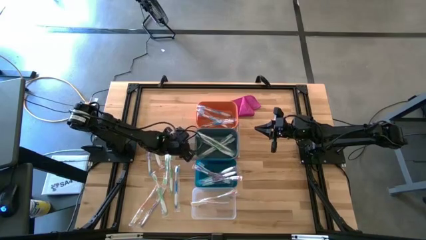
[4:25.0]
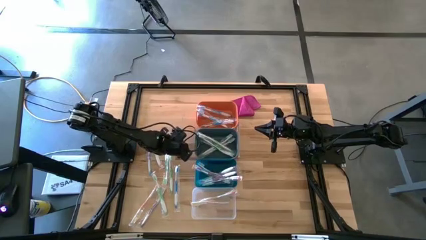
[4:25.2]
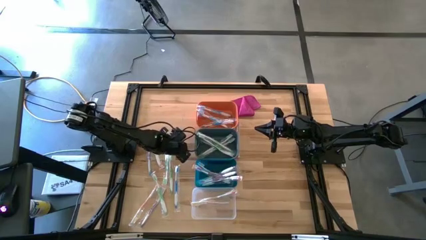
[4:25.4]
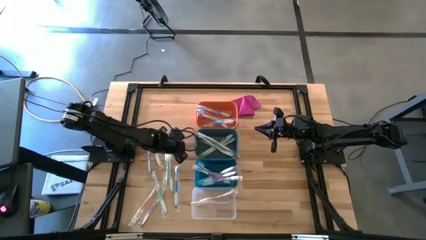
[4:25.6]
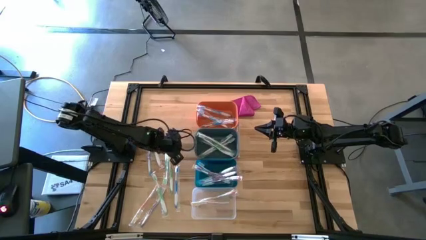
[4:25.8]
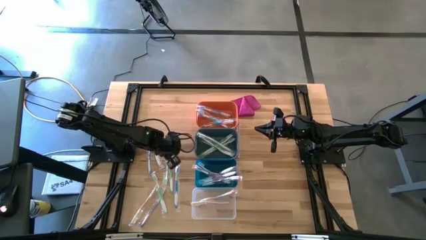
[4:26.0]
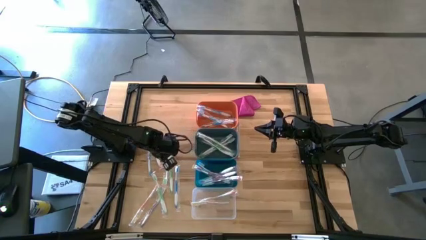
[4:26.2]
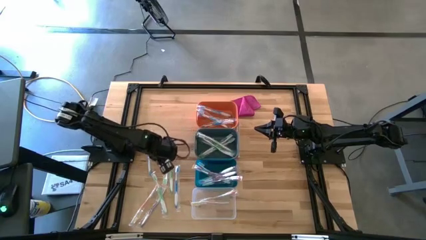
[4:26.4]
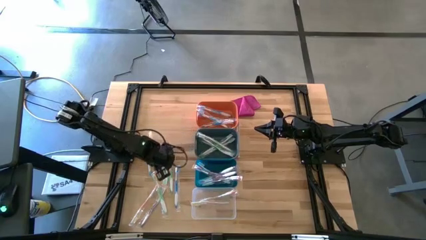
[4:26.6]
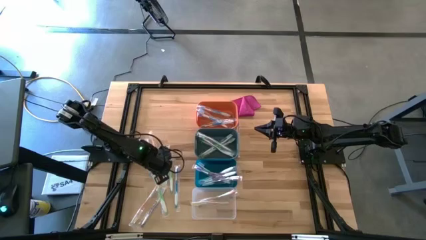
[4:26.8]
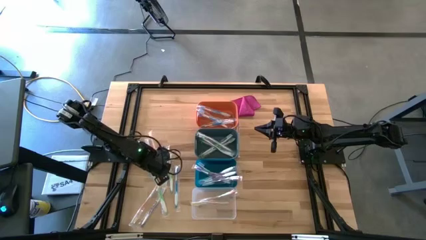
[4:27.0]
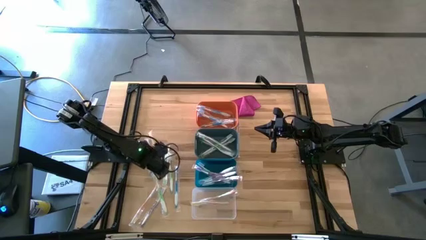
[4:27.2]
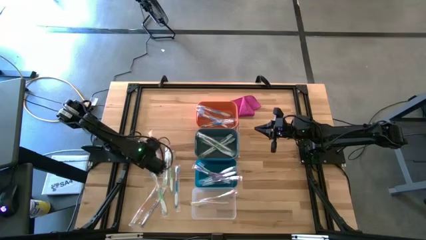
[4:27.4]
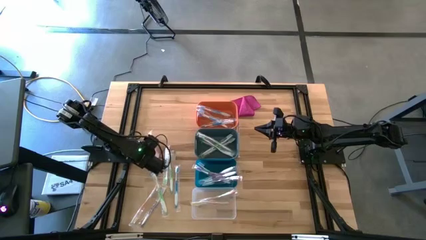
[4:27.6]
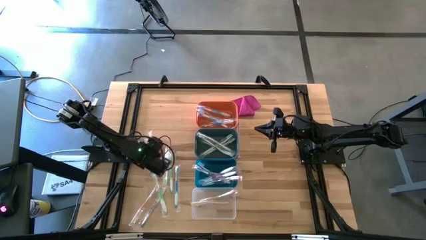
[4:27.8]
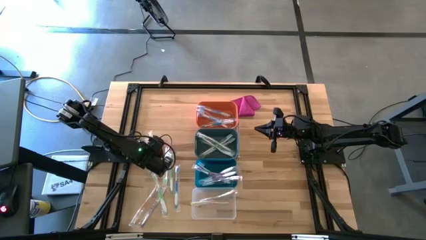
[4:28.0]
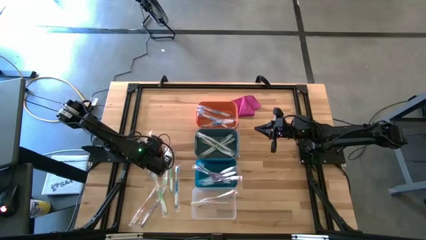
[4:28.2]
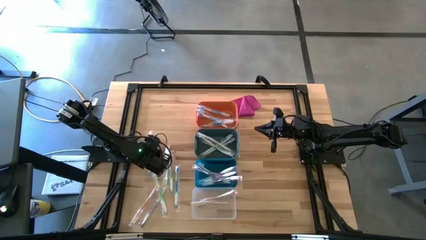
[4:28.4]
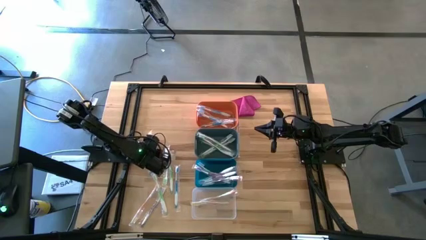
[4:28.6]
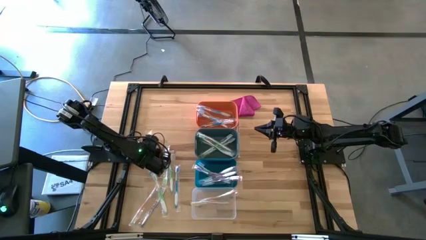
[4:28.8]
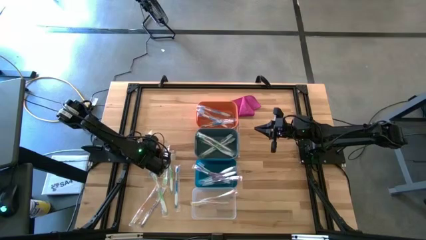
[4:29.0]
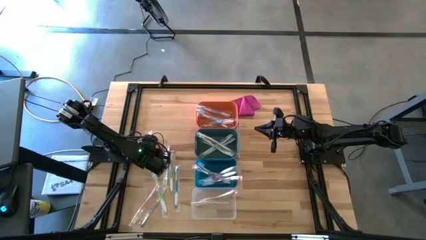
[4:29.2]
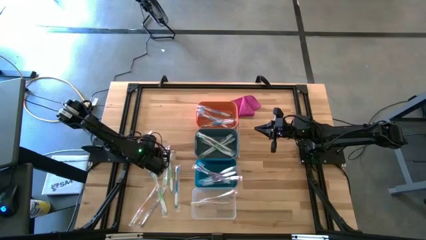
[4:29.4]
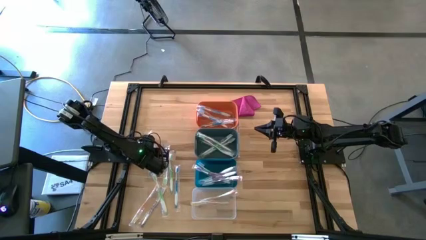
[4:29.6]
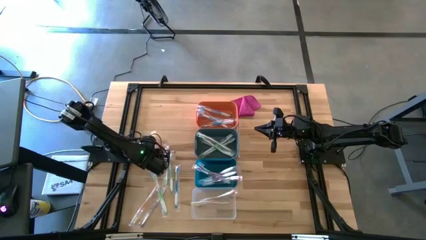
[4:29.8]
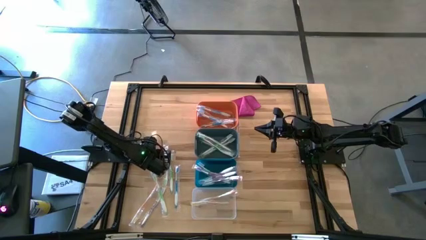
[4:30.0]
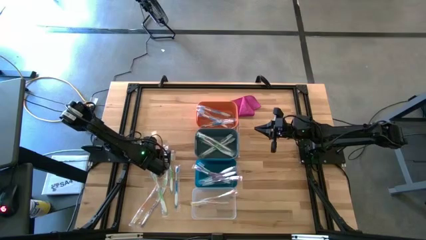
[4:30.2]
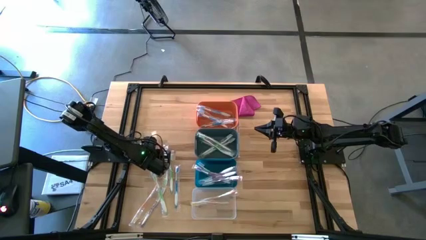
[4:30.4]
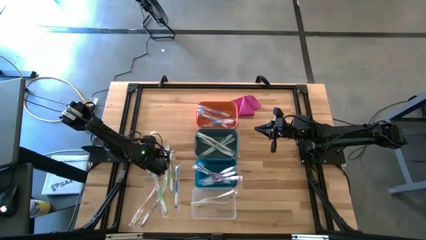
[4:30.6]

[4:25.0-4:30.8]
Task: Pick & Place Toothbrushes
Put the orange toothbrush into the transparent bin

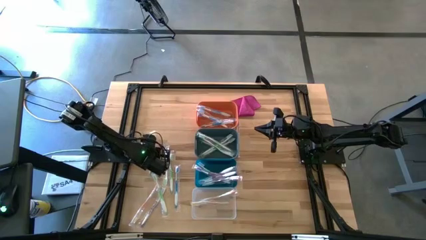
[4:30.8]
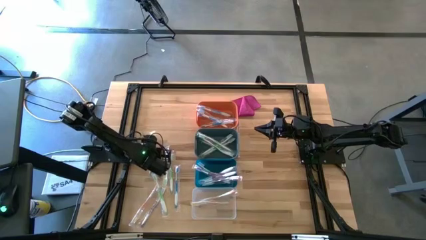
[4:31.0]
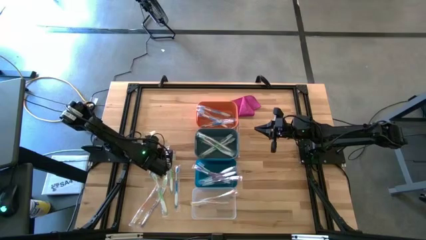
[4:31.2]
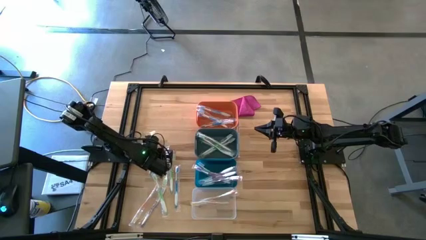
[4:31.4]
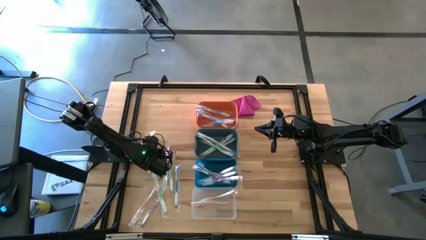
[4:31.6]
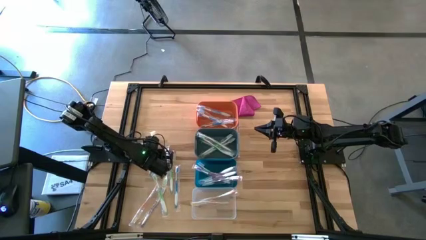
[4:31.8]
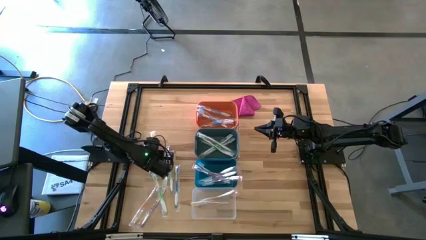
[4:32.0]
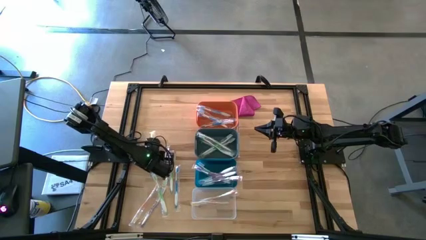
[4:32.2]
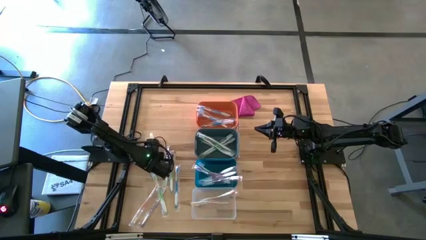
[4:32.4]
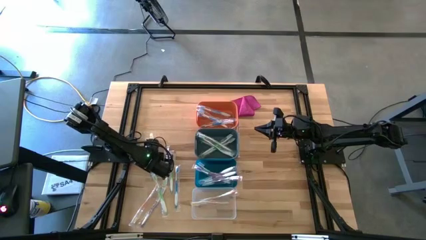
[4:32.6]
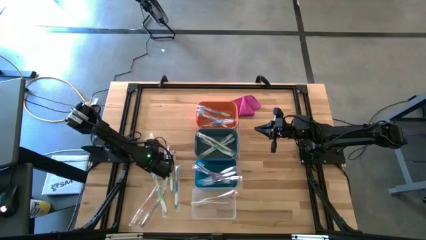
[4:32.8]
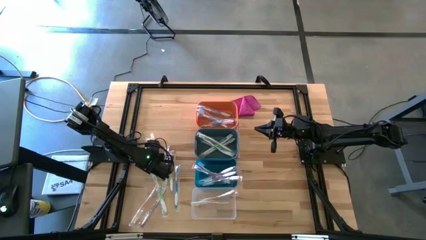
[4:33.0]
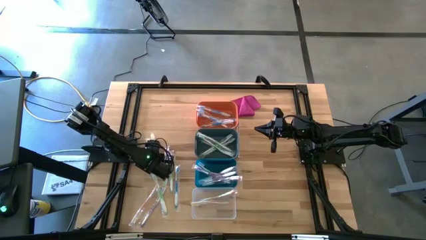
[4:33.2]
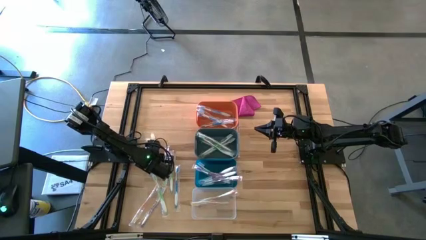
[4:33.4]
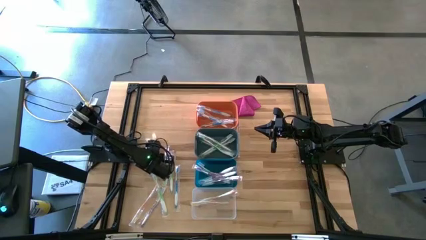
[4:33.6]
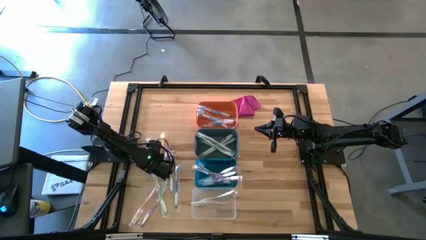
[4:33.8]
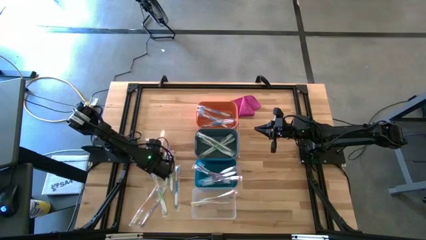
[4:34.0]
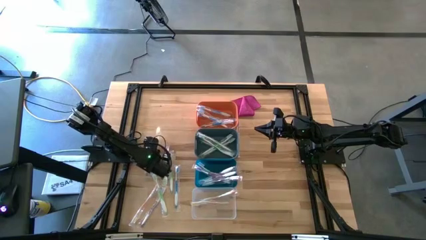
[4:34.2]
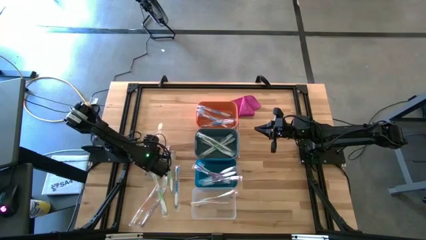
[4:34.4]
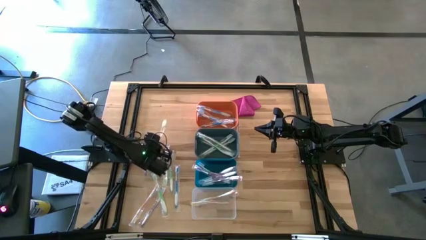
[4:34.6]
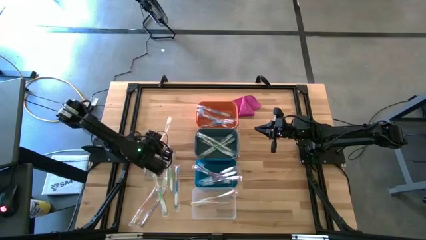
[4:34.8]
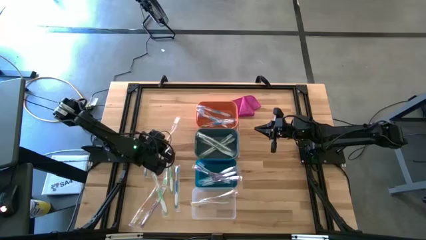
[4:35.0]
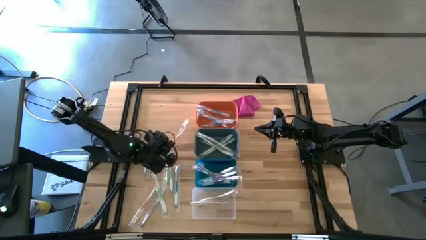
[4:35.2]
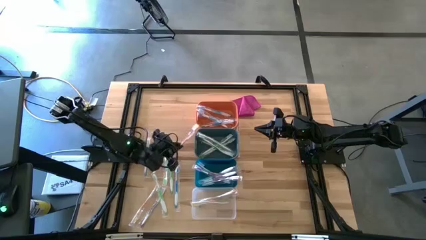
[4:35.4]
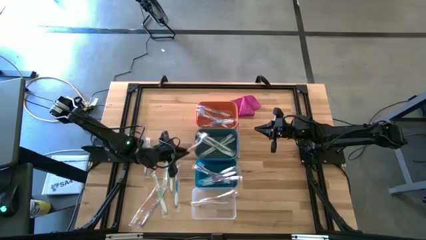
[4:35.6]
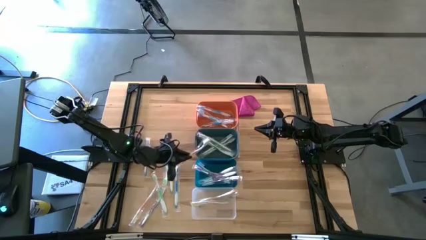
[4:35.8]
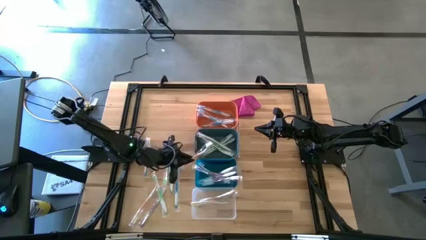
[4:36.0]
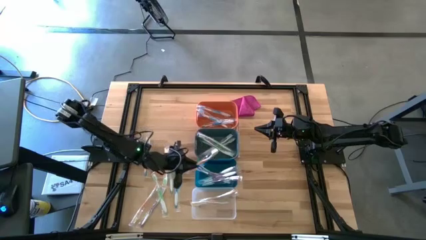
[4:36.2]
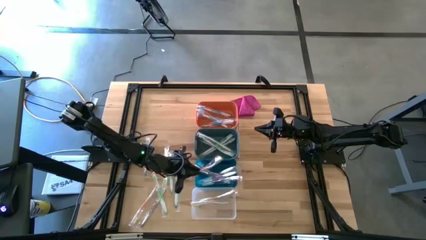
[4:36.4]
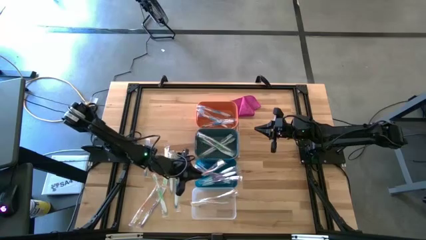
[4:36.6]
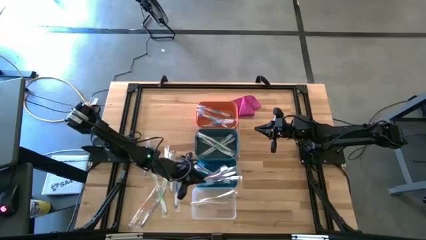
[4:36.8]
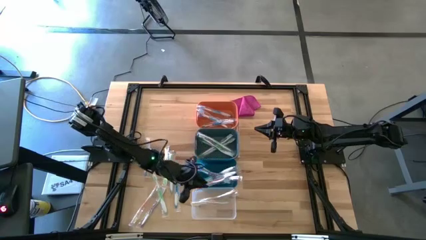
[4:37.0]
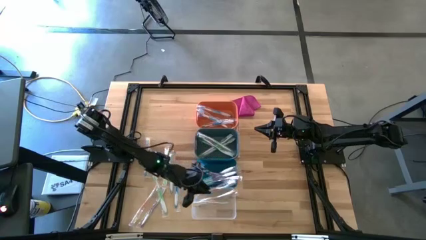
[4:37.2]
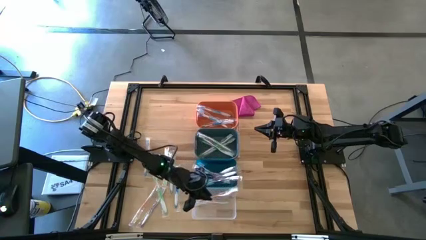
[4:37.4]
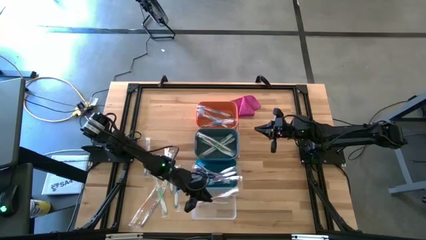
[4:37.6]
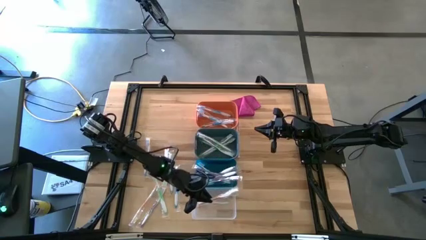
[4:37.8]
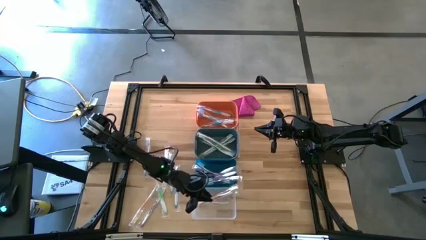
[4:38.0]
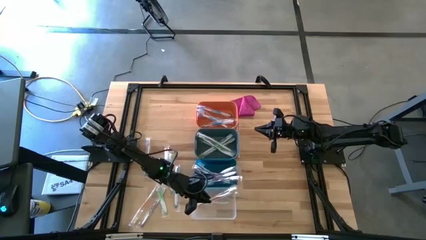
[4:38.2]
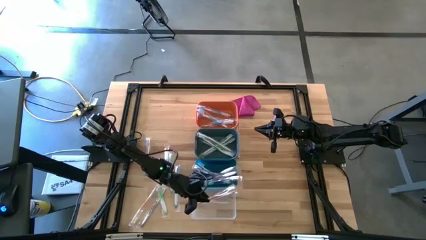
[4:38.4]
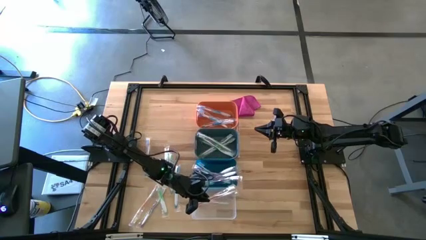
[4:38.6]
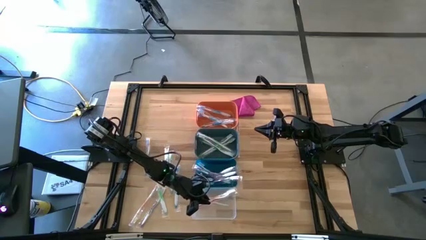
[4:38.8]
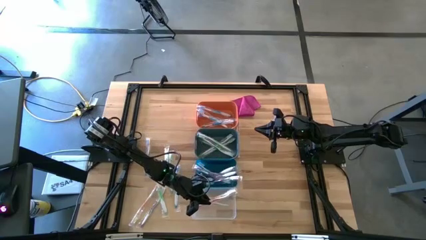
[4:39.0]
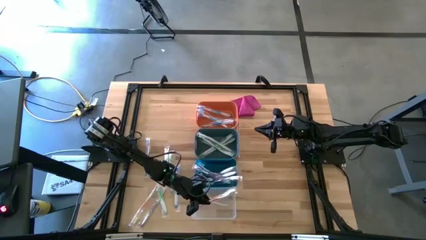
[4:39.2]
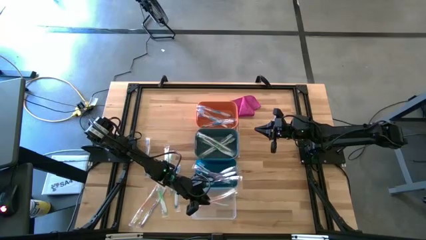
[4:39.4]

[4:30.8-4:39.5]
Put the orange toothbrush into the transparent bin

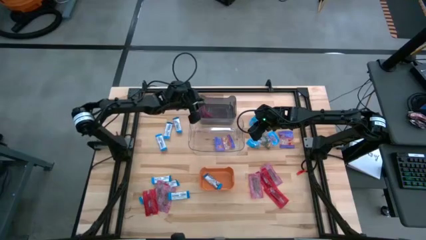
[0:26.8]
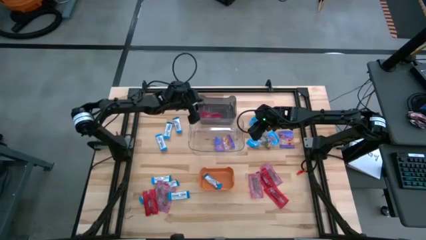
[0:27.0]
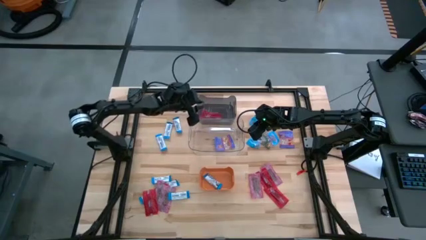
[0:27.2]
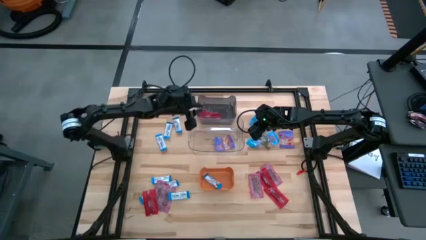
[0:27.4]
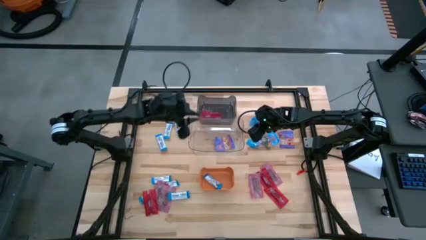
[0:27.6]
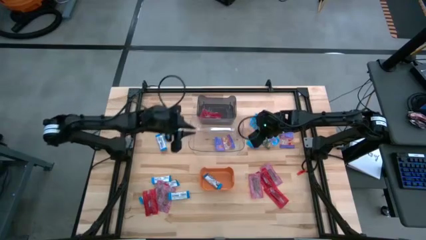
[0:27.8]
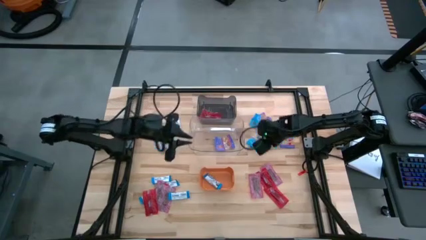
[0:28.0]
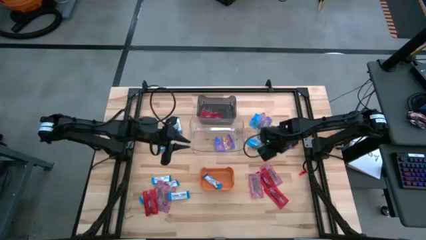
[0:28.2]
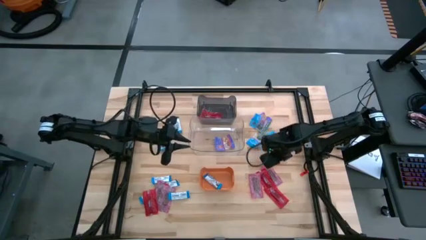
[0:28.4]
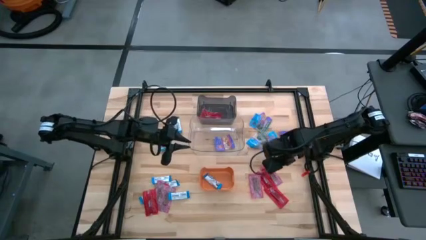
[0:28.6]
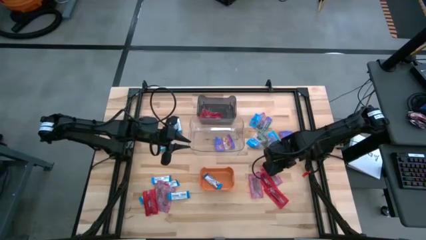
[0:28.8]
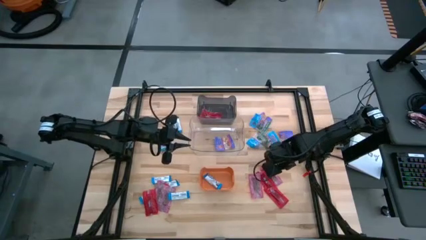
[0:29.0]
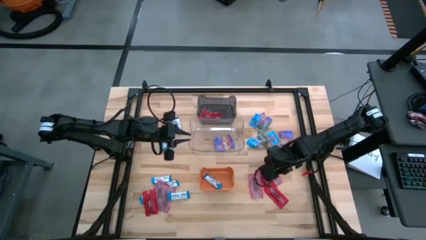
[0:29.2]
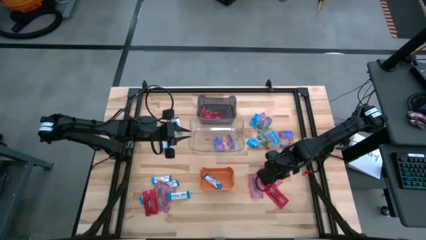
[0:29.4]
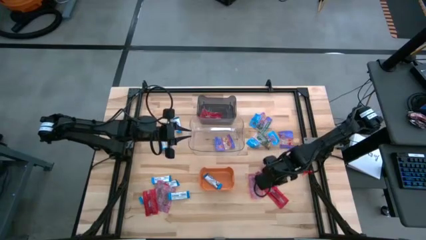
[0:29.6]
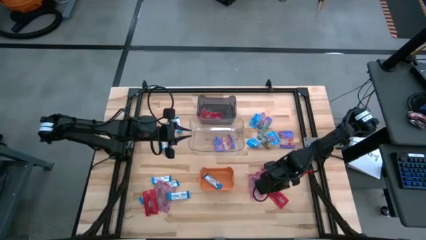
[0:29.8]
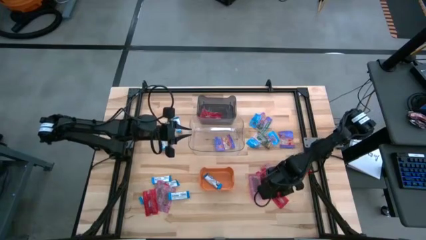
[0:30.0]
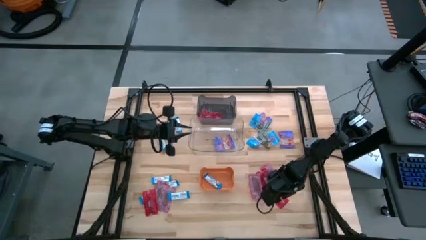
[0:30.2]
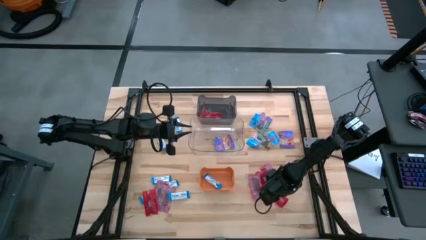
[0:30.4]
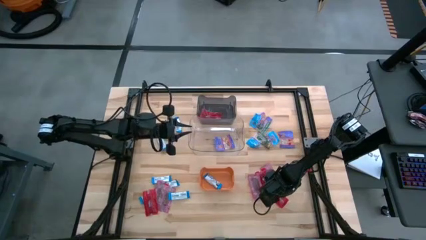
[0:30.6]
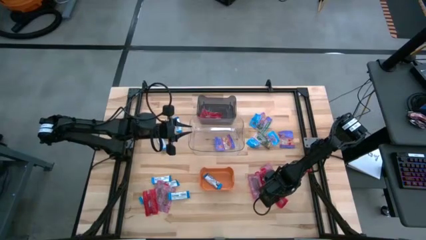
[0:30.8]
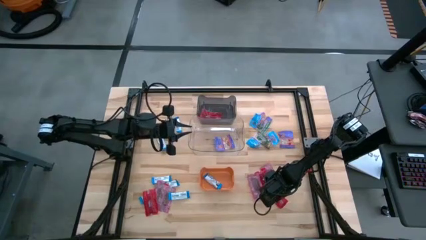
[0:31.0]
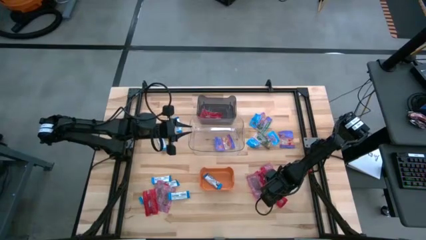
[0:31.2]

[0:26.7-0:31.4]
Task: Sort candy
Put the red candy into the black transparent bin
